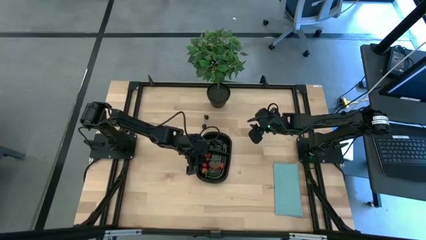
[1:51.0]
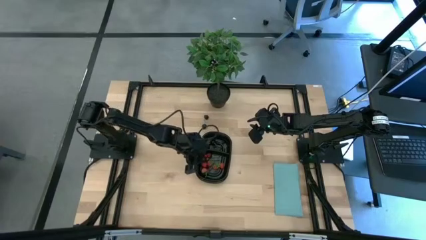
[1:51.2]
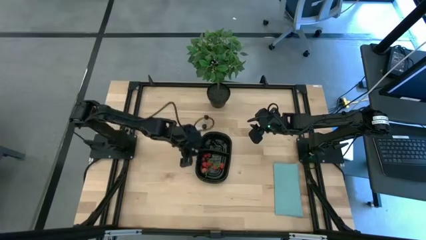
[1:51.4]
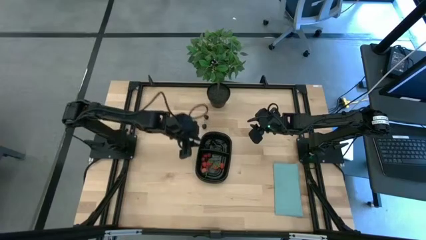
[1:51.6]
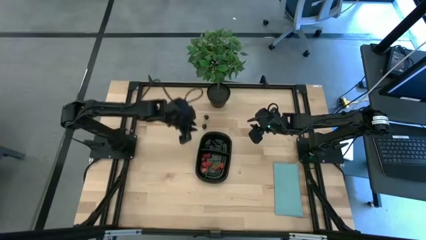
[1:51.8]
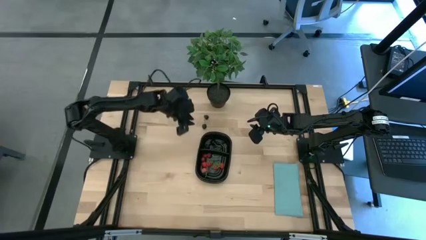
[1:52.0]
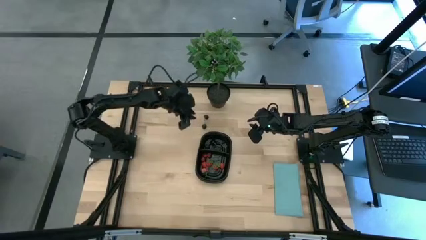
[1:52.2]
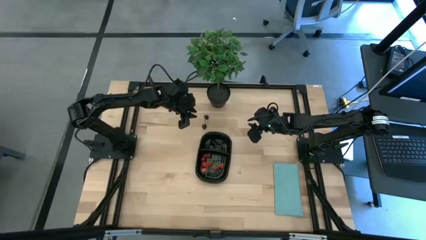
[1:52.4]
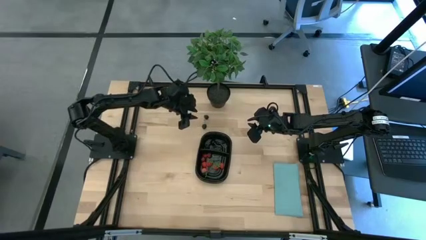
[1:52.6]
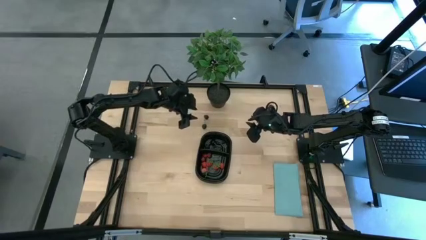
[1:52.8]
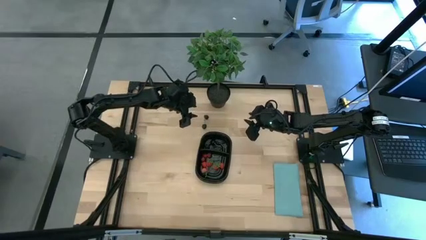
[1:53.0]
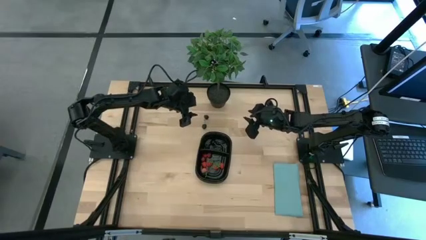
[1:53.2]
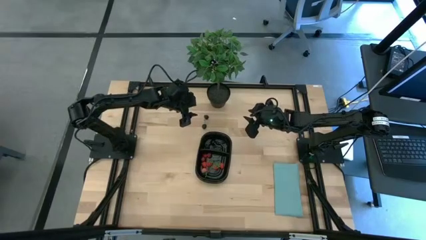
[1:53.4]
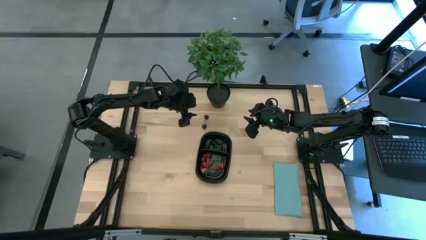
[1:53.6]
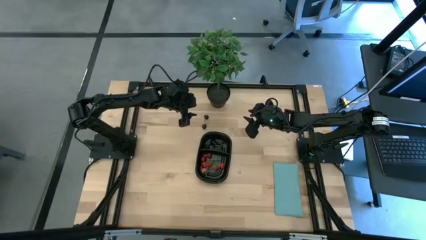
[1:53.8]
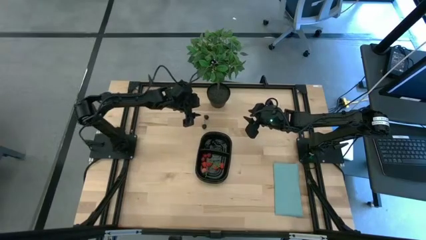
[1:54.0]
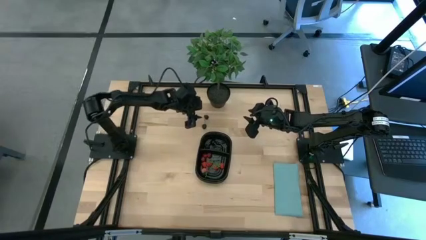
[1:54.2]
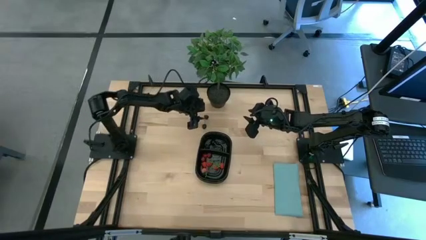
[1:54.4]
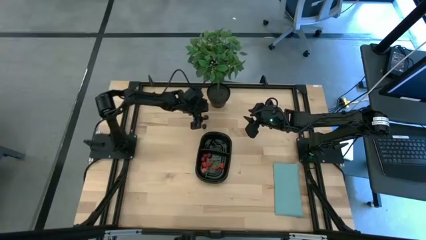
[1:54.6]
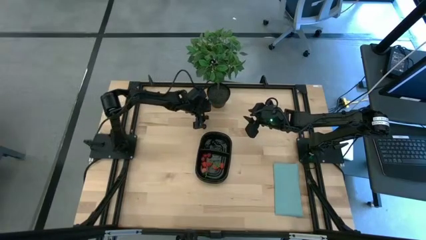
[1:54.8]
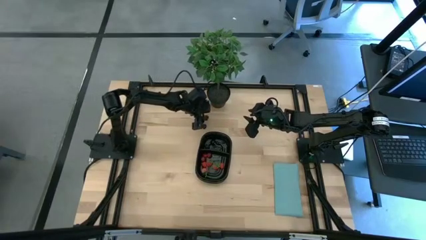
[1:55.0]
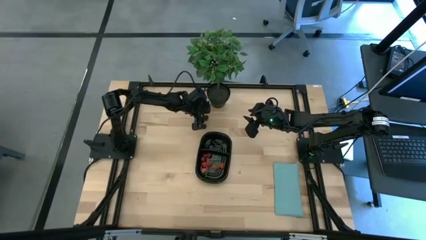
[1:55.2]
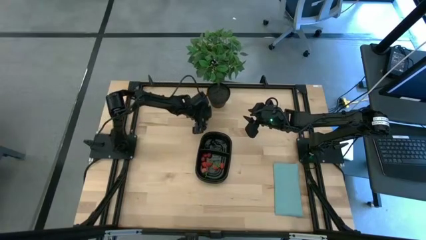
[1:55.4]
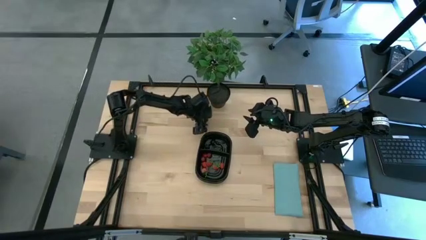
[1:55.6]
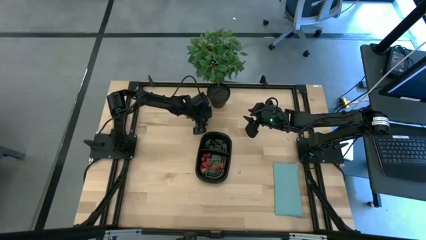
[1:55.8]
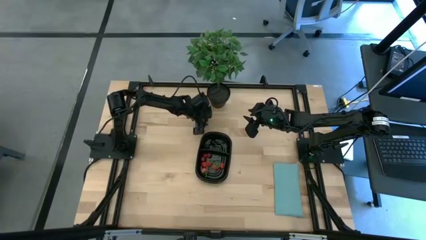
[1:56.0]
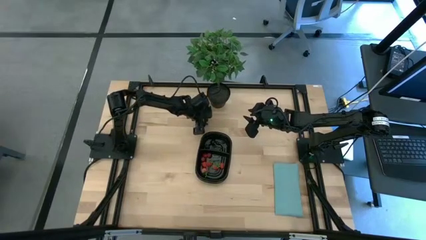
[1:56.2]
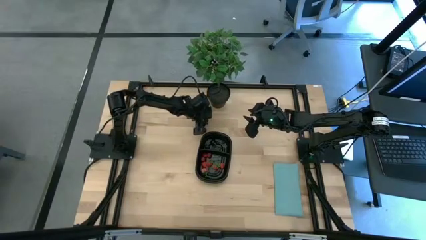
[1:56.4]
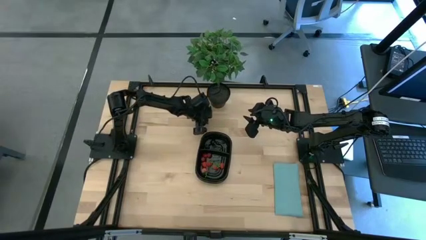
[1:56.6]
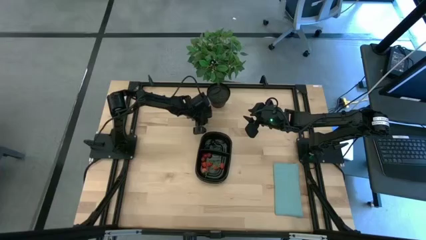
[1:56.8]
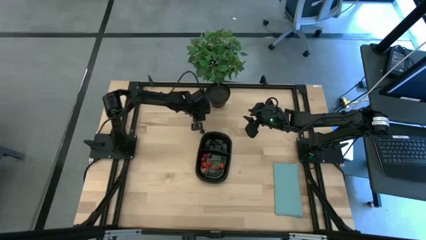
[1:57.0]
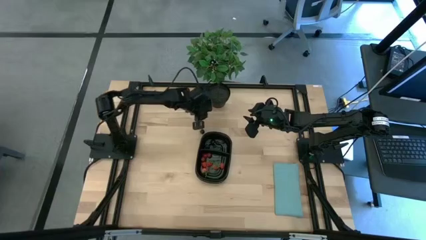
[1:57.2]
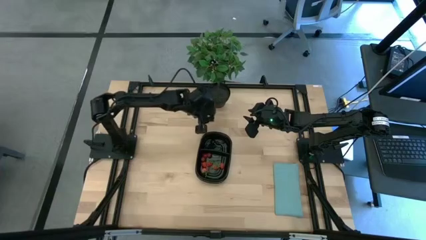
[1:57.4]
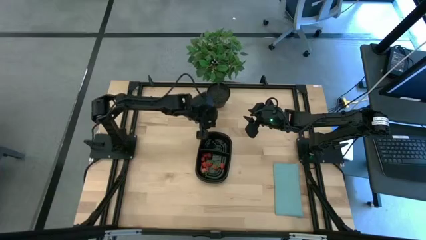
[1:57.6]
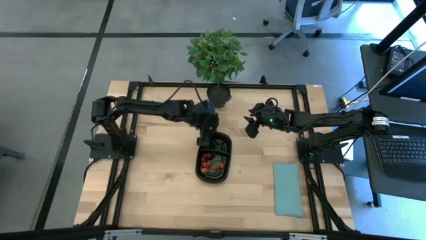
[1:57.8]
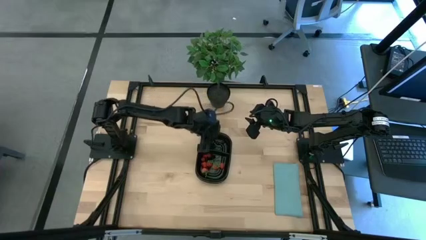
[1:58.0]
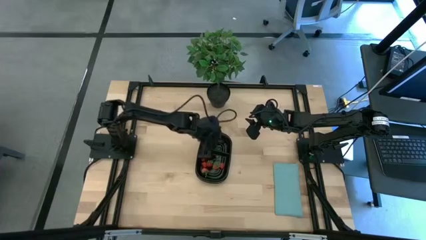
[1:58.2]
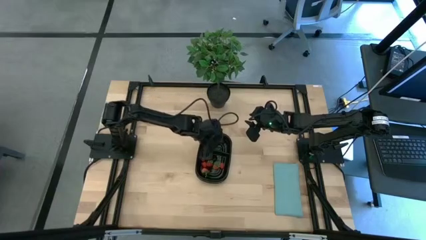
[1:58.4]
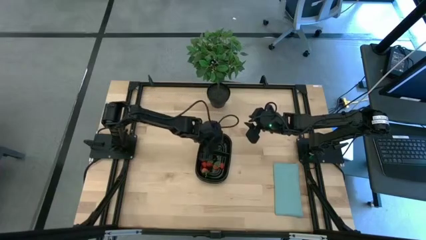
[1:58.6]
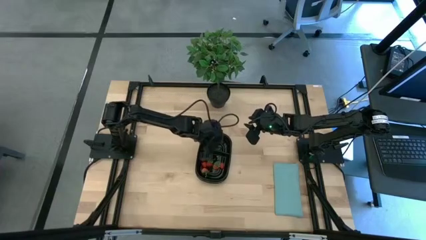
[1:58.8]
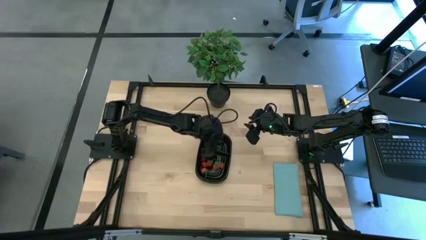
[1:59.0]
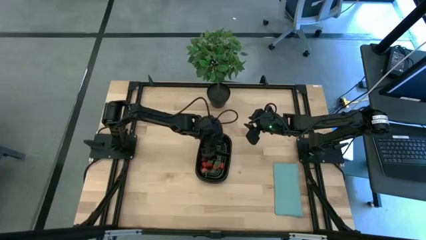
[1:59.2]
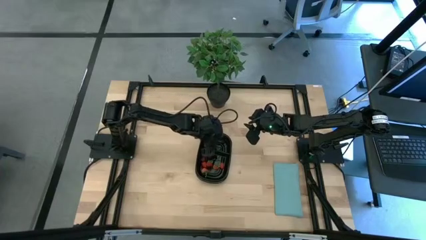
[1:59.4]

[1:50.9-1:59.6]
Task: Pick and placing Produce into tupperware
Put the top black cherry into the black container with the other black fruits

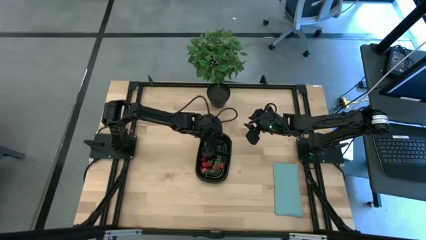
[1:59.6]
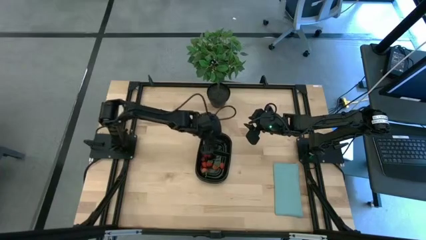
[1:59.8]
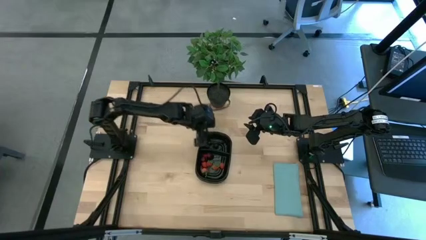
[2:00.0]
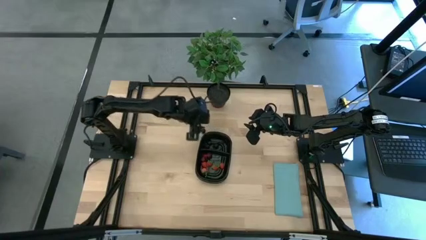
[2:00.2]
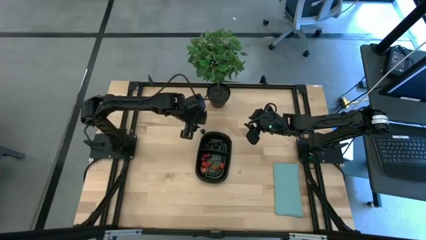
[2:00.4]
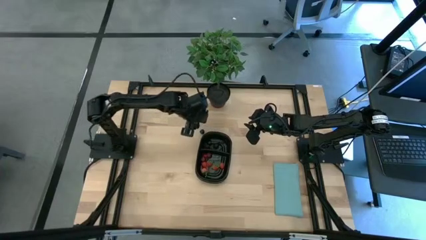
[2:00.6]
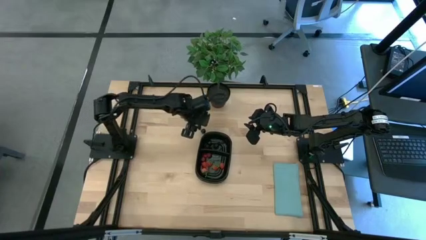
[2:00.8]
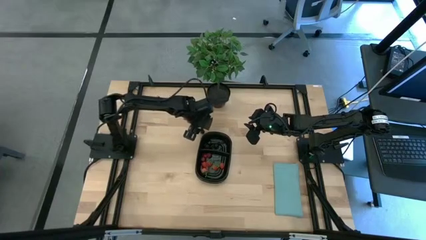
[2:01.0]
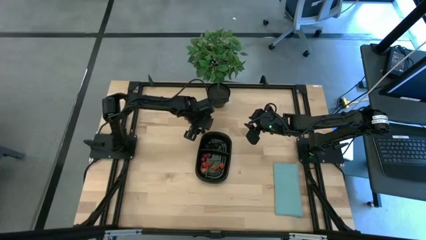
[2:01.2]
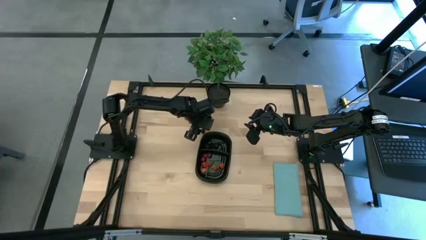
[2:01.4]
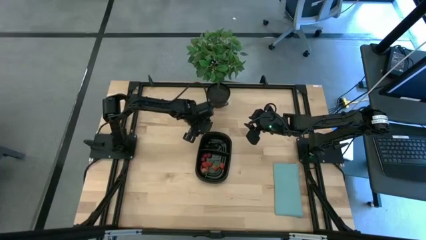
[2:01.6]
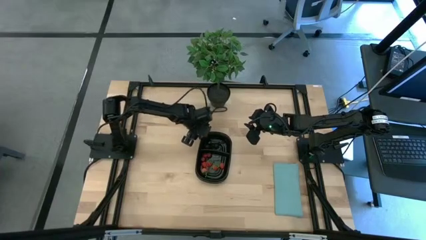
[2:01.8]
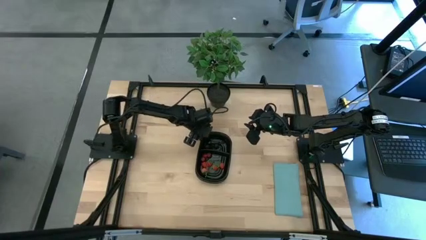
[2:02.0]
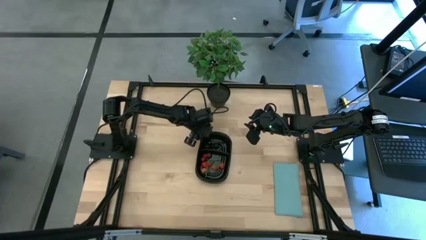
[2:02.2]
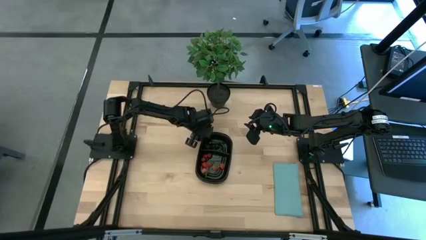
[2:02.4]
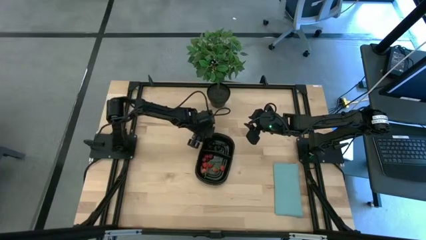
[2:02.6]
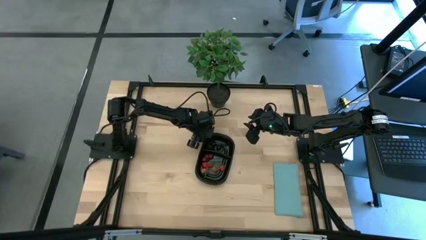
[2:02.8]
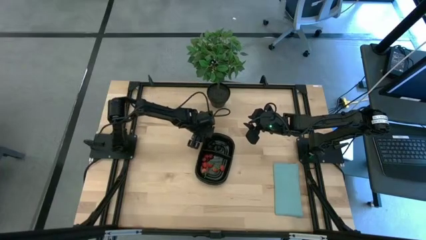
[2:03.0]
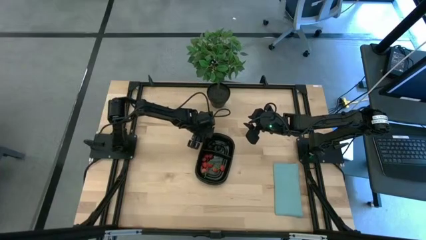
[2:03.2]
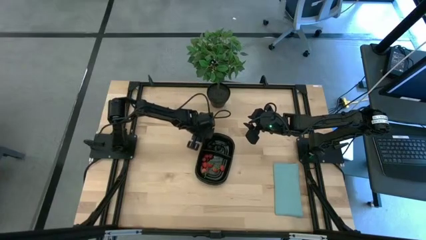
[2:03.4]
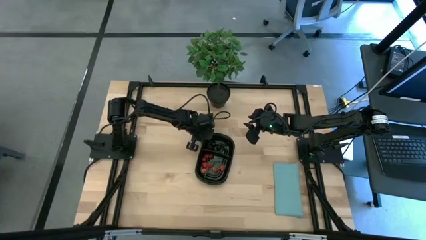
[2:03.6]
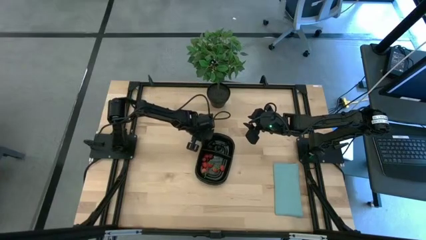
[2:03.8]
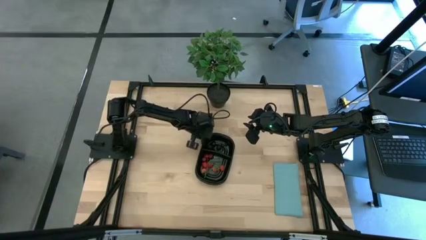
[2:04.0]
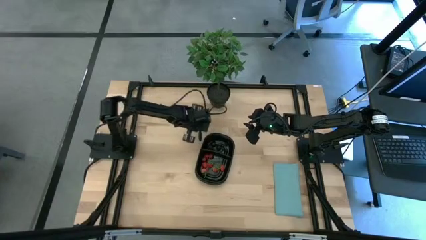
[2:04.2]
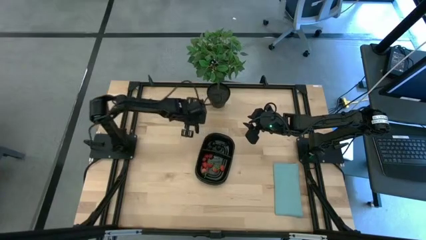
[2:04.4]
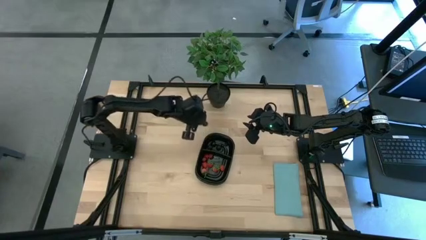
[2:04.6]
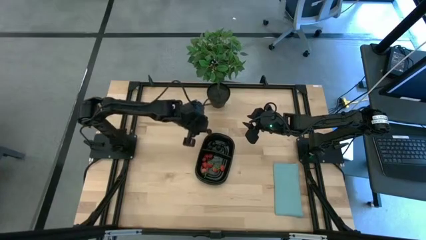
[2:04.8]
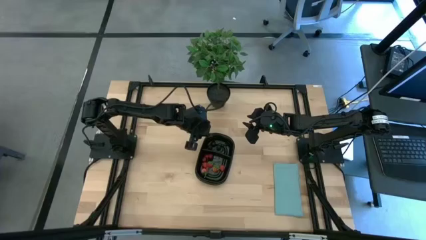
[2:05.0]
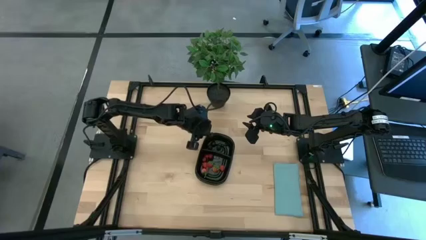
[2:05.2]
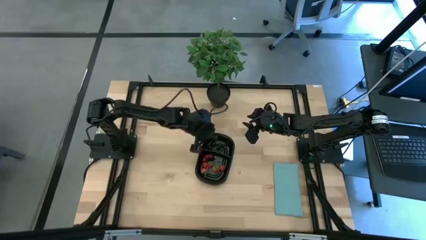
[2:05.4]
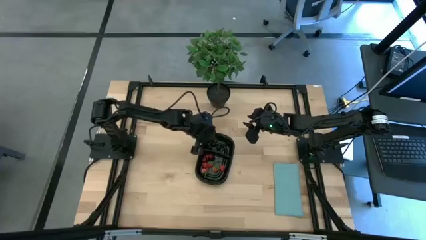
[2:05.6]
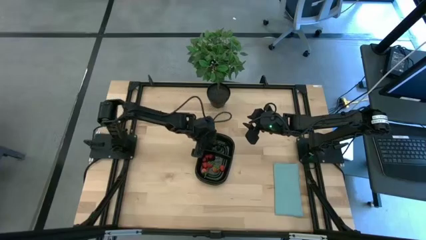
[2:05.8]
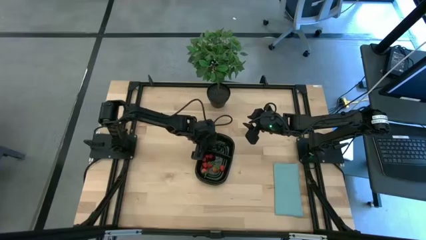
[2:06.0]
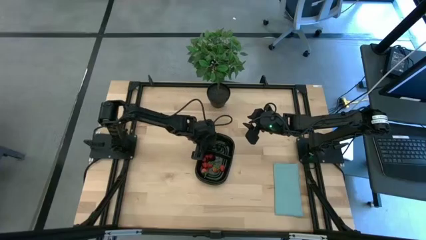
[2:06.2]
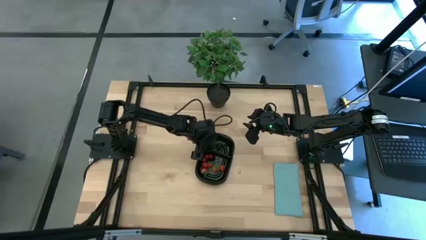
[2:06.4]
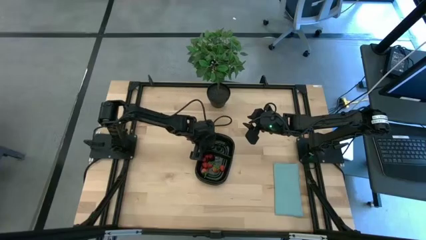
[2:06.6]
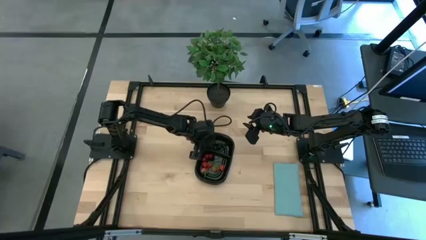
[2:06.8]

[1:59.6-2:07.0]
Put the black cherry into the black container with the other black fruits
